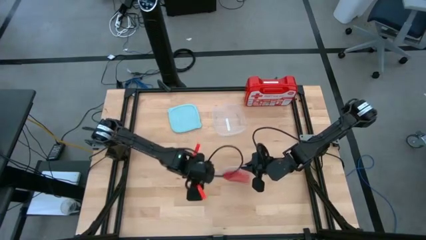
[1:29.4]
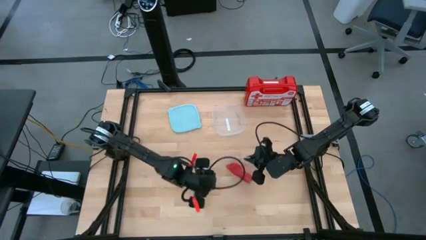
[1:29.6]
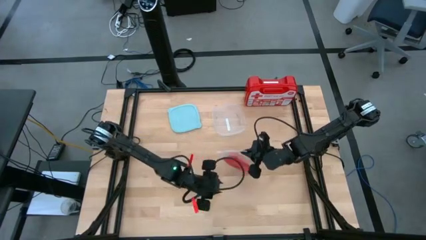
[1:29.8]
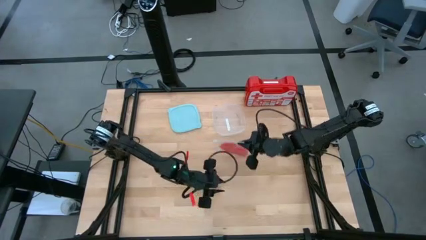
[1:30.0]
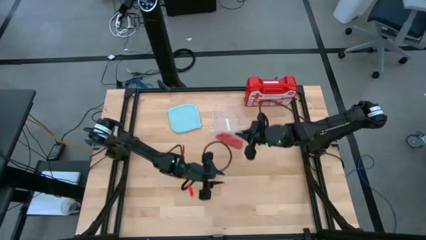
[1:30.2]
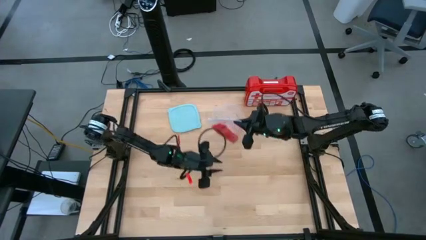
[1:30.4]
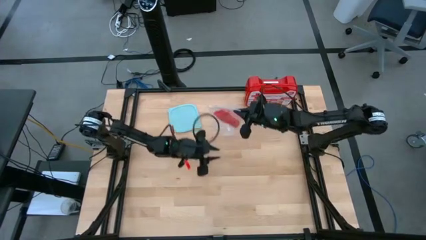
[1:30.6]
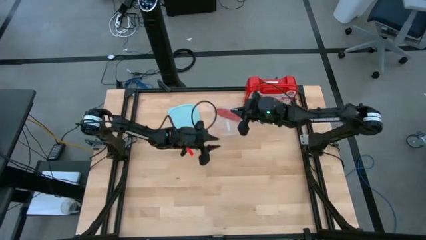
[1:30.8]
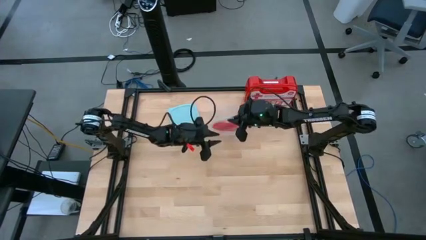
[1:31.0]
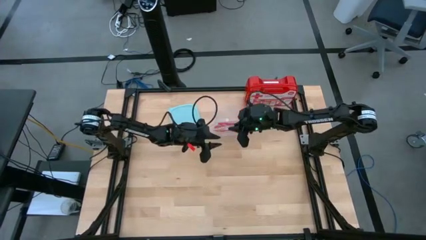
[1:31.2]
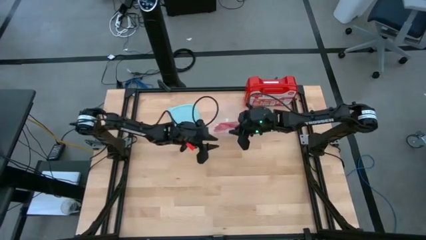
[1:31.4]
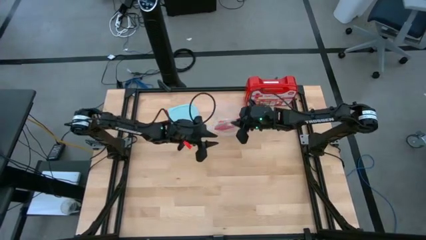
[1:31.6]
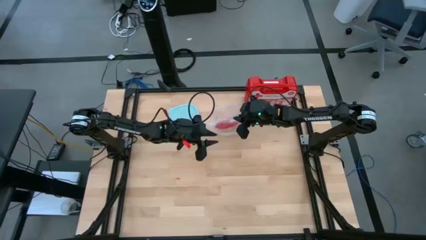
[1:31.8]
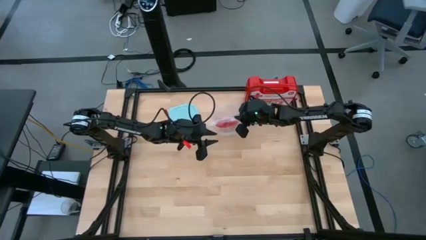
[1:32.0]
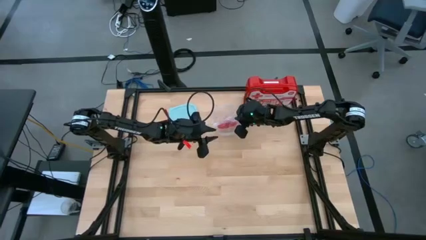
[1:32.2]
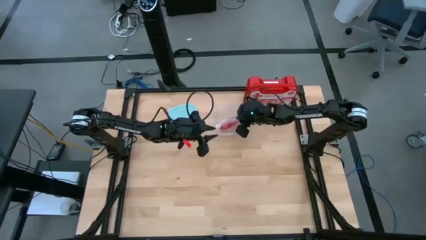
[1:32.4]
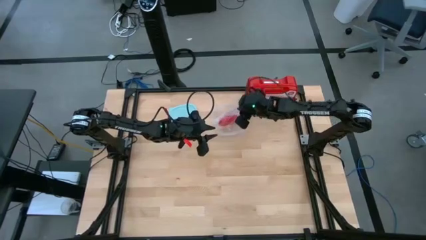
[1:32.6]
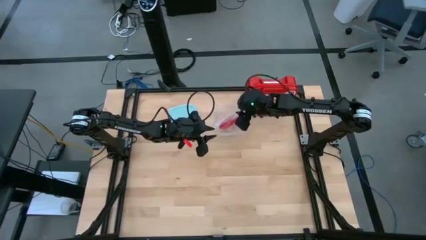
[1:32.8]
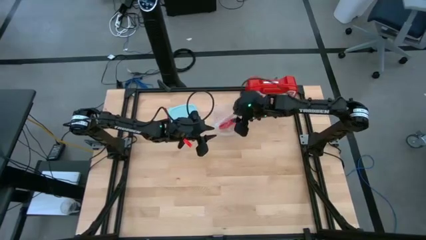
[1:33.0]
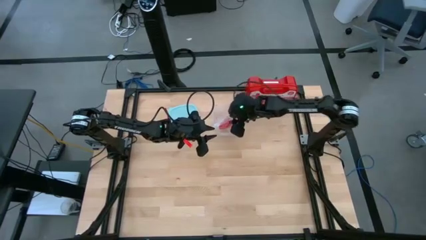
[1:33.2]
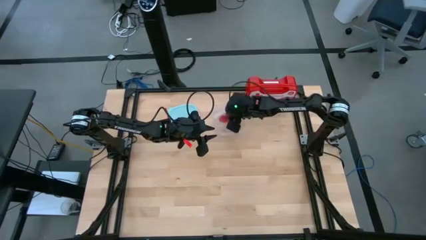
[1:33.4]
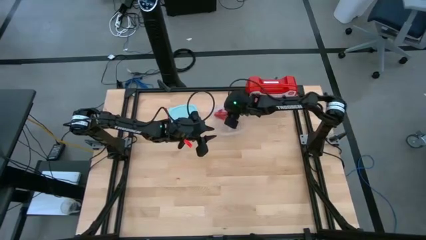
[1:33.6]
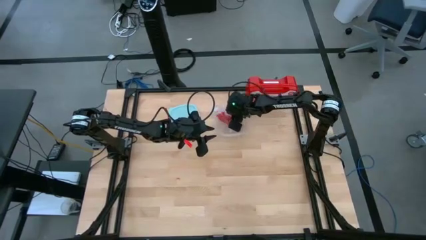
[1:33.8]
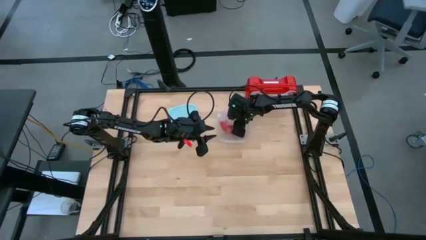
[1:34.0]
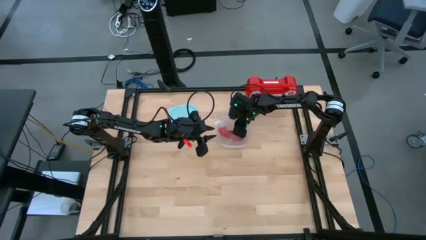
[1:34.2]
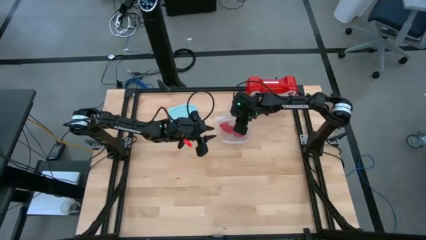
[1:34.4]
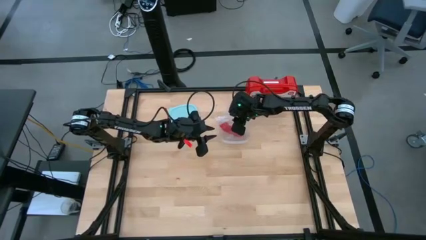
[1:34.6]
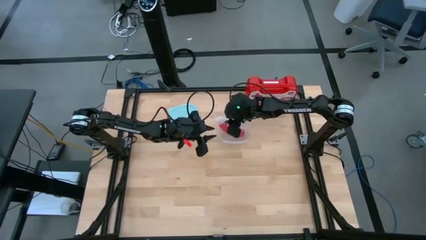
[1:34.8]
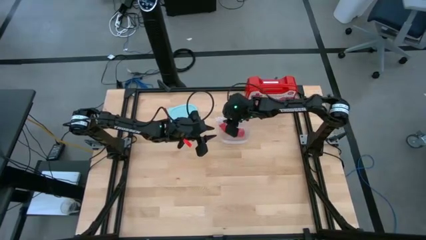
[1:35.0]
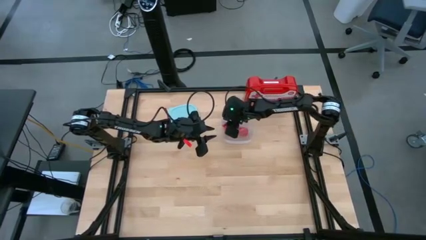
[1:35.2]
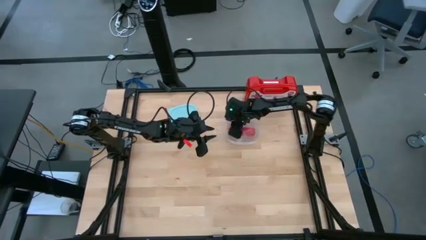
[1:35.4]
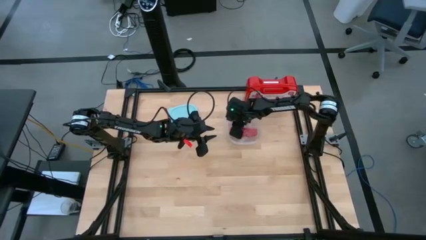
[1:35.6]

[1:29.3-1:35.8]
Task: Roll bandage
Put the transparent zip bag into the plastic container

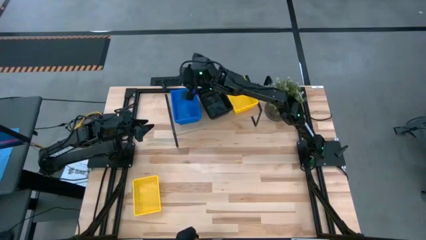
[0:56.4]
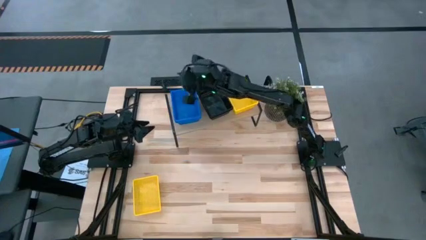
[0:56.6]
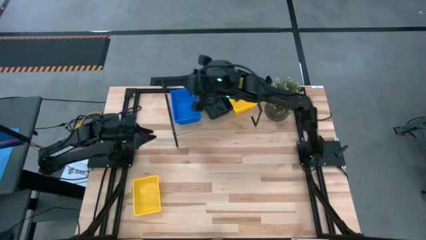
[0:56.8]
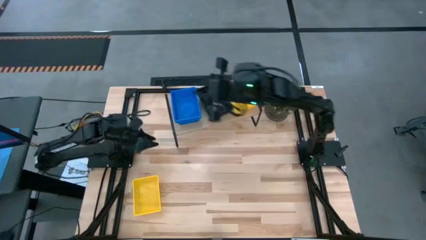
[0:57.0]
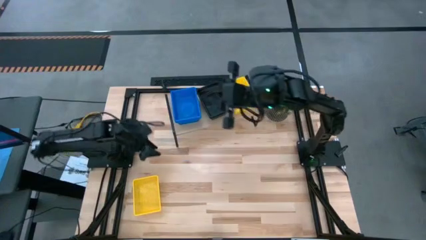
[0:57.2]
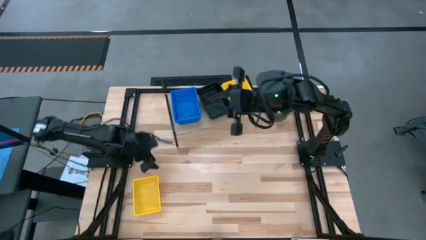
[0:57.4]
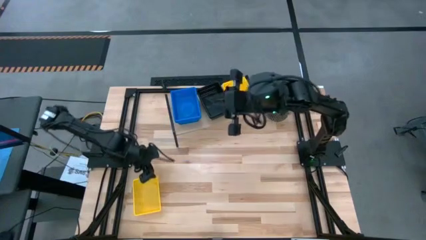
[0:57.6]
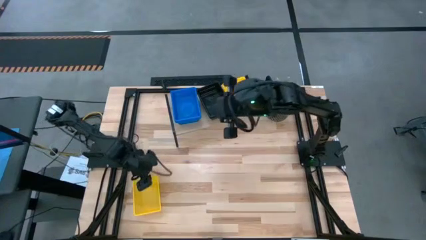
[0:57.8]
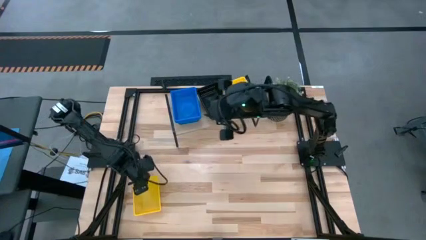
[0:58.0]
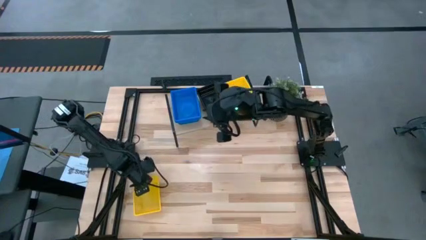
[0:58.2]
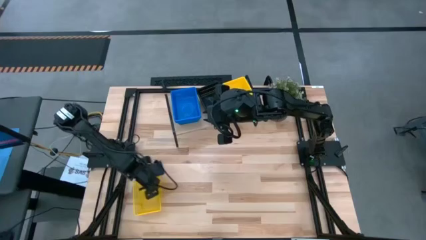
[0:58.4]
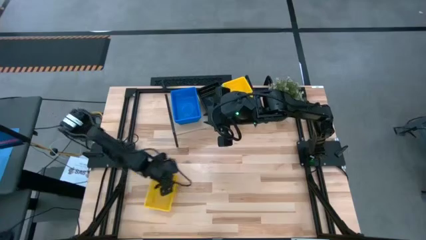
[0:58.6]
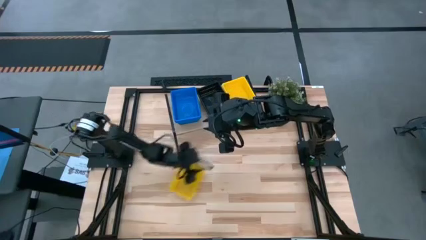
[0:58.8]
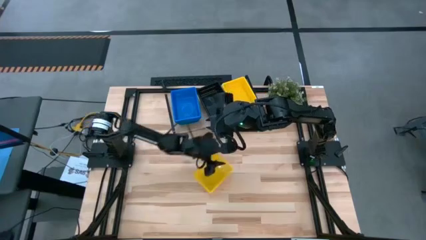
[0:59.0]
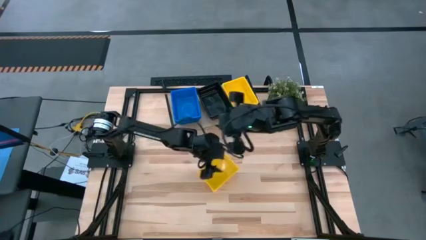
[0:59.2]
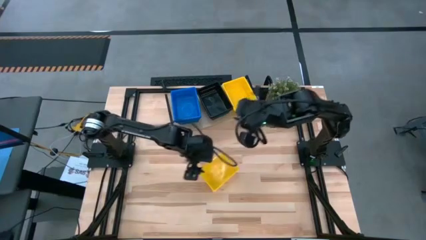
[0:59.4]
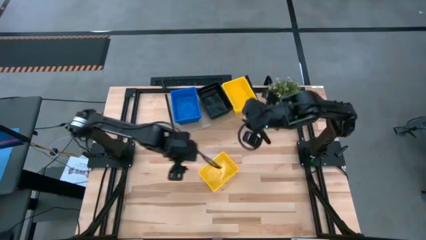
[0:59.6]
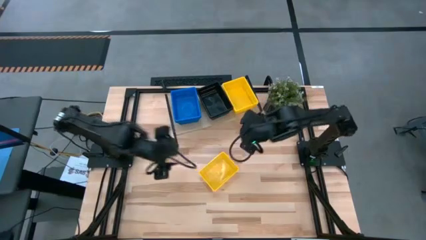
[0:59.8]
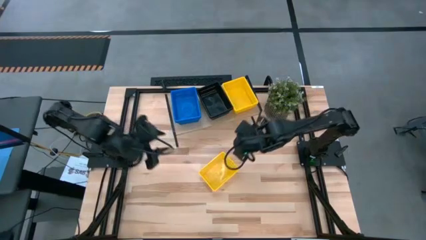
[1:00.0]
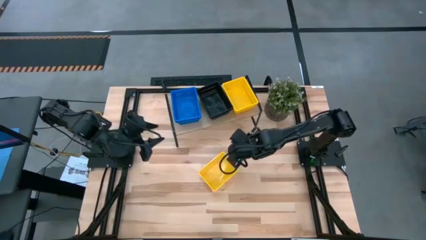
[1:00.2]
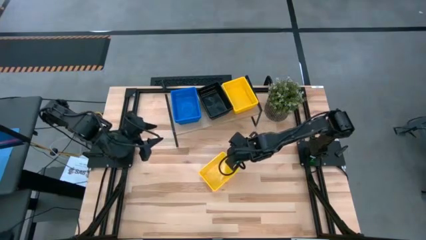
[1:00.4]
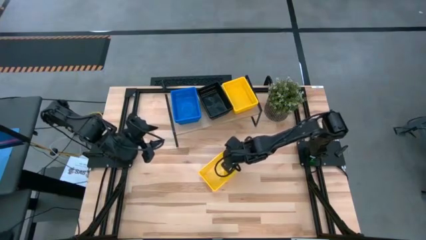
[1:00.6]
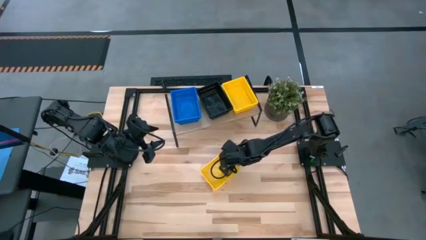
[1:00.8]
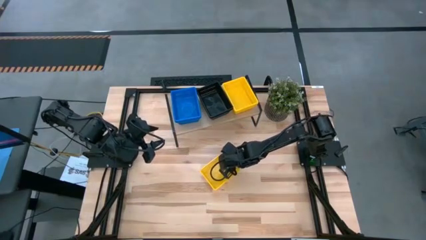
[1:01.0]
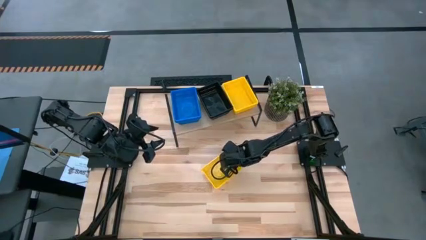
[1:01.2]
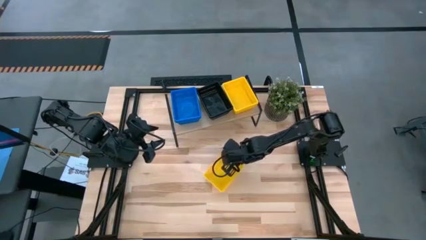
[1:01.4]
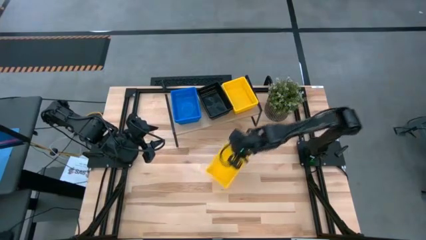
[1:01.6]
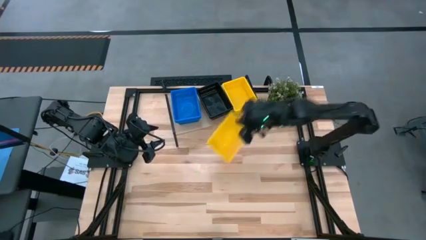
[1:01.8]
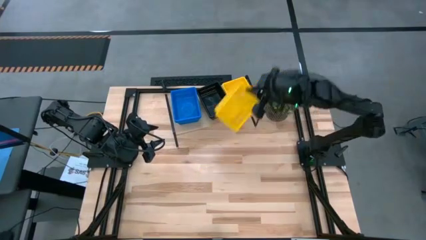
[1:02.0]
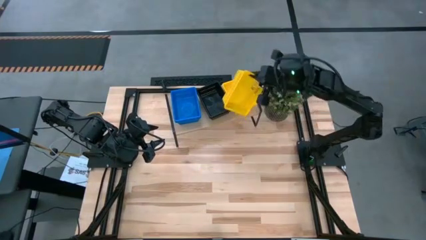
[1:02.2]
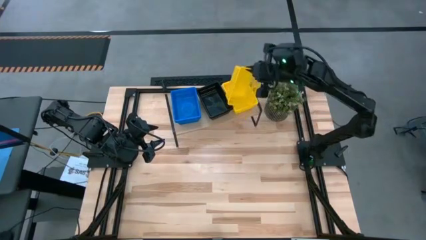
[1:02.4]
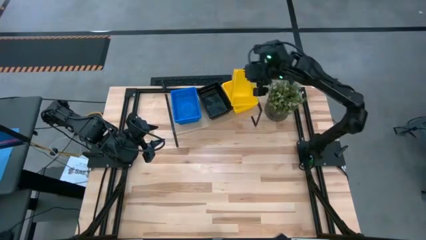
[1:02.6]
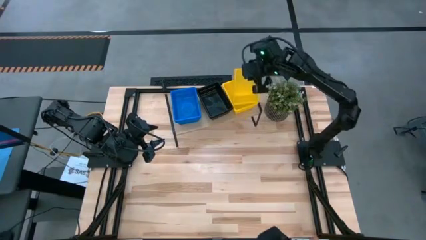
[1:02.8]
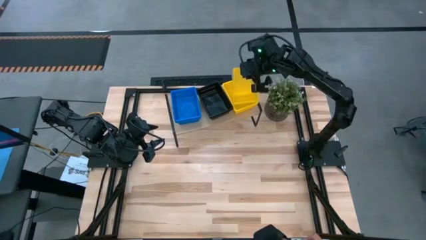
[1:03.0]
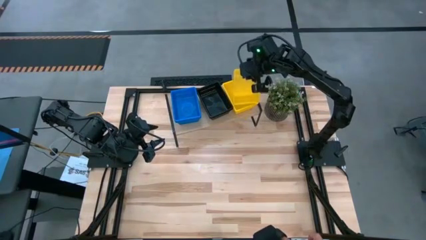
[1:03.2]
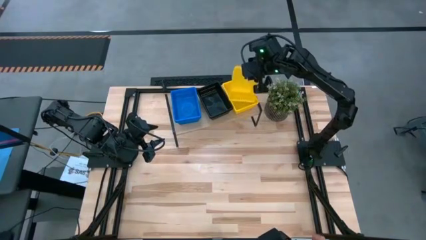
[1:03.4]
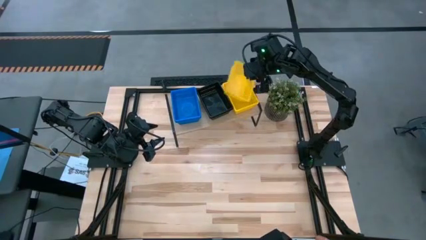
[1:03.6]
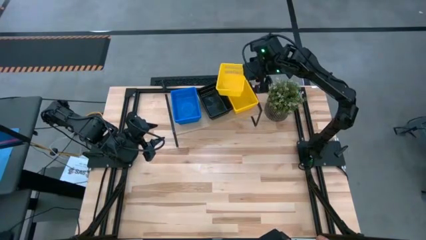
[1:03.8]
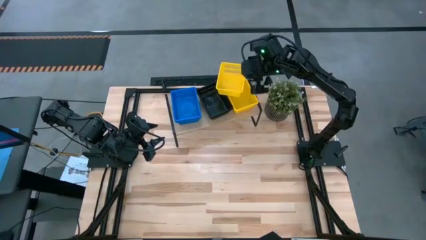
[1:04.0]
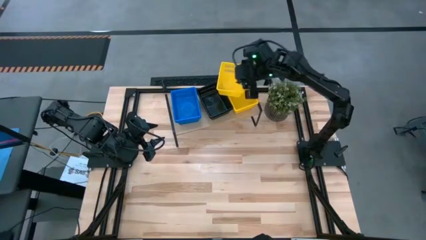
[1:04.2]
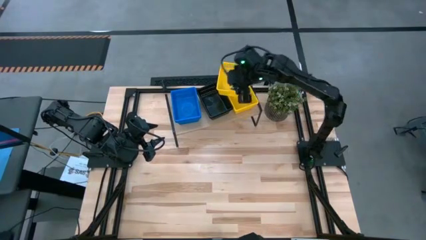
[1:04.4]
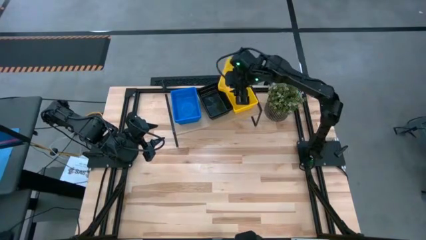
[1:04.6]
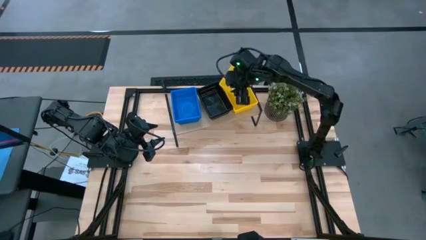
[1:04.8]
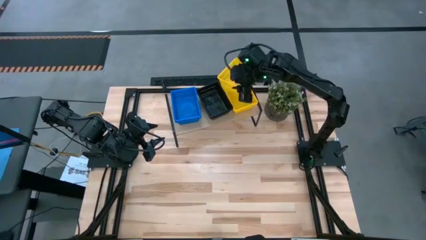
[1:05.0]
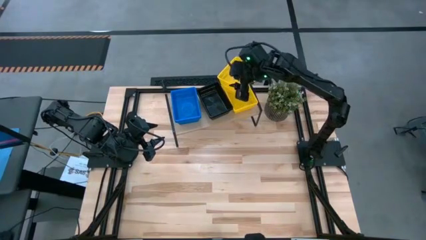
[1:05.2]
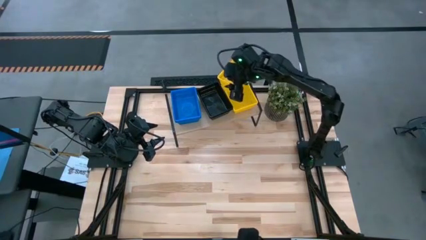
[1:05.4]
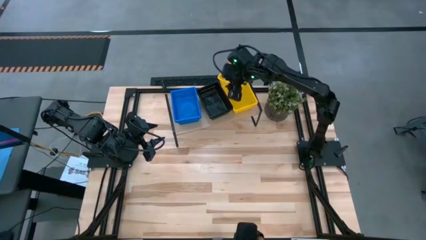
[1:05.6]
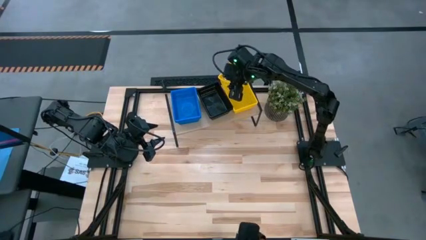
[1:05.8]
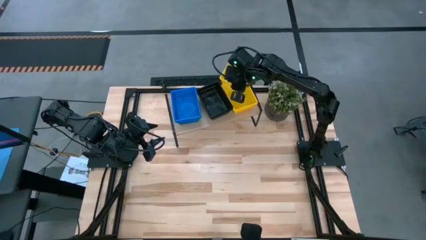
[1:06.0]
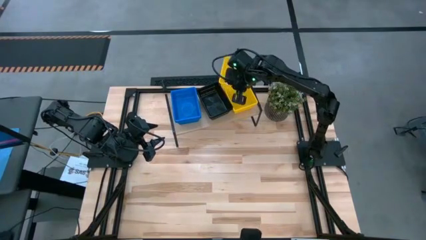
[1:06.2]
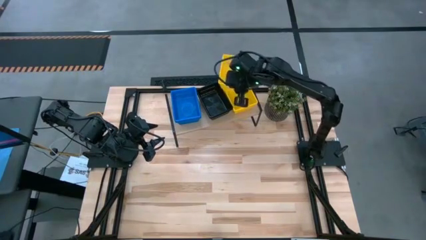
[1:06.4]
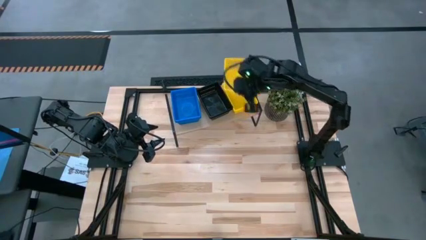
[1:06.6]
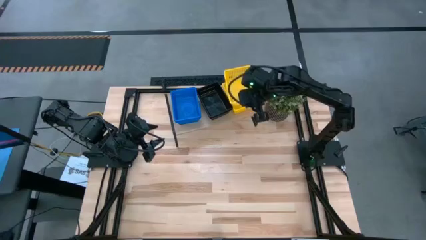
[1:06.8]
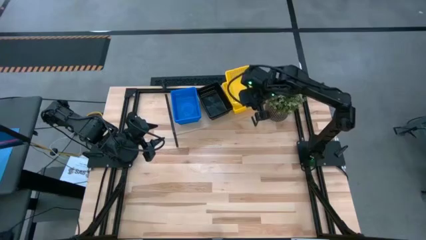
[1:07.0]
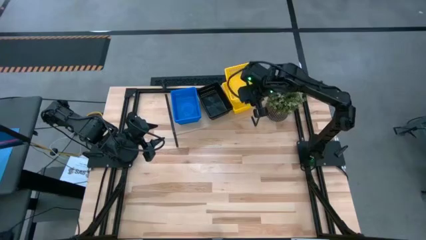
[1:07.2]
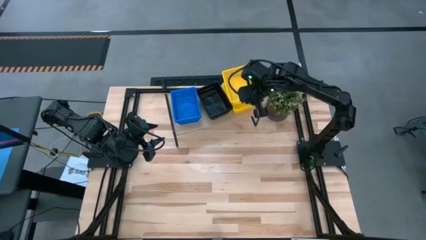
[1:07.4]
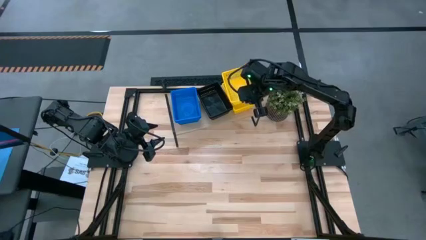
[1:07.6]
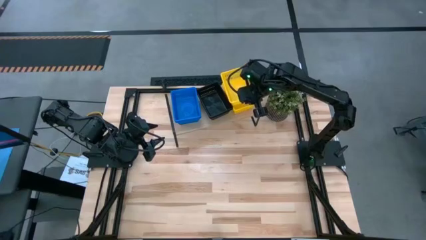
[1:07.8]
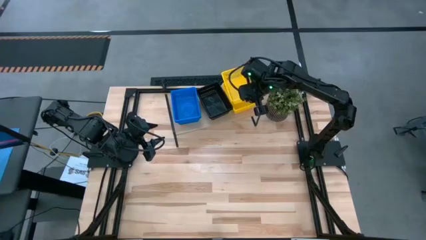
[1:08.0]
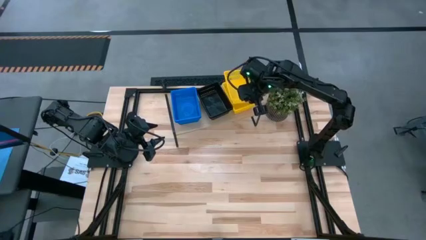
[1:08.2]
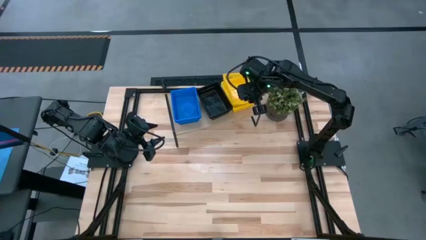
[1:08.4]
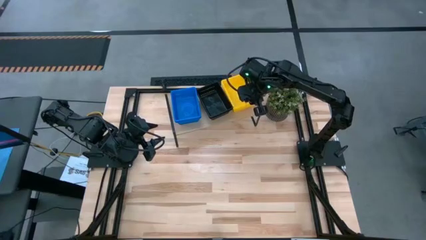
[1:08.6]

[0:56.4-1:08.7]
Task: Stack baskets on shelf by color
Stack the yellow bin on the yellow bins on the shelf
